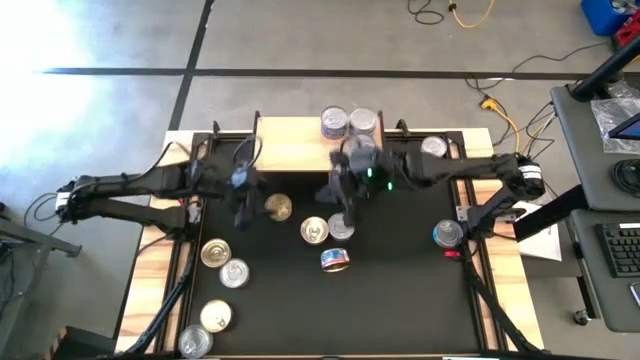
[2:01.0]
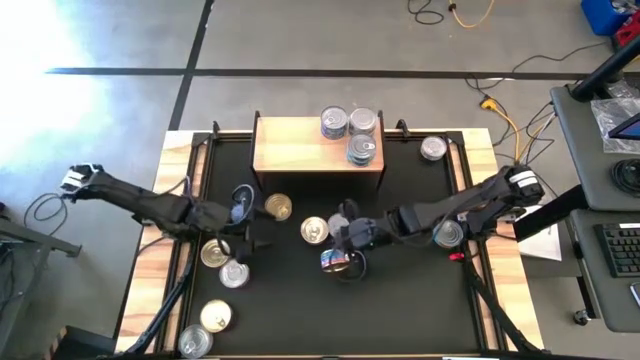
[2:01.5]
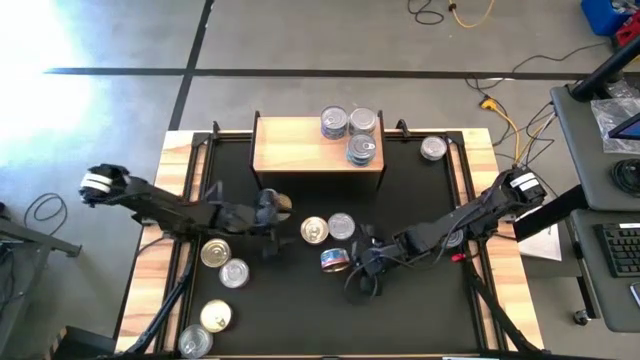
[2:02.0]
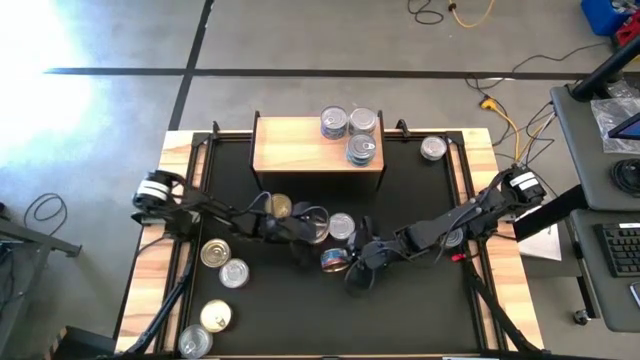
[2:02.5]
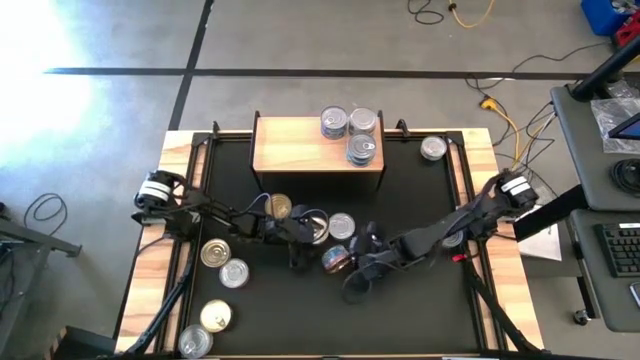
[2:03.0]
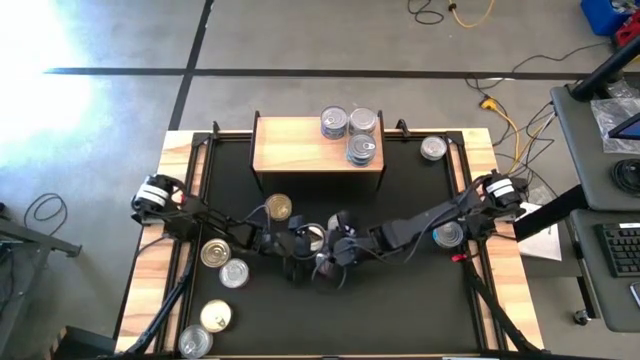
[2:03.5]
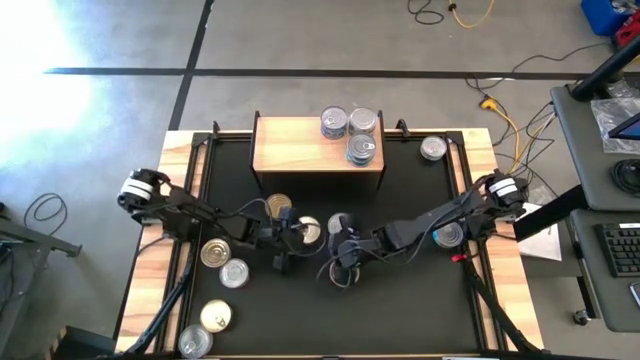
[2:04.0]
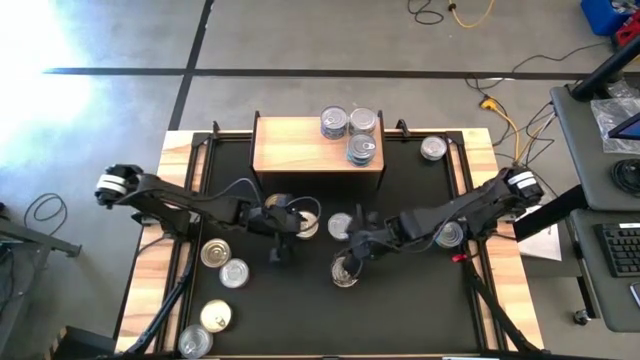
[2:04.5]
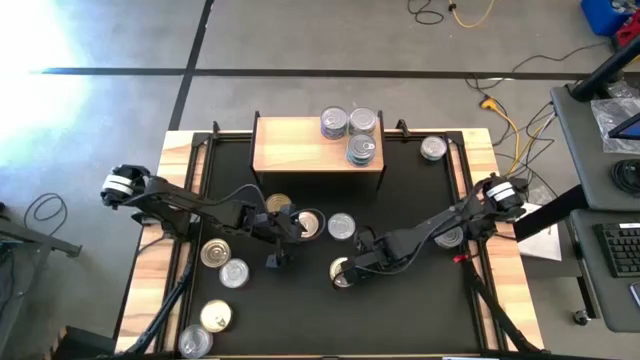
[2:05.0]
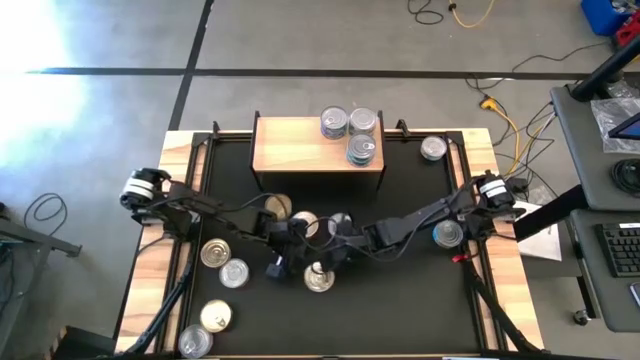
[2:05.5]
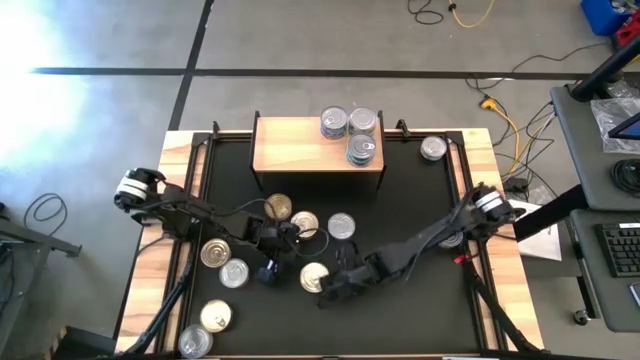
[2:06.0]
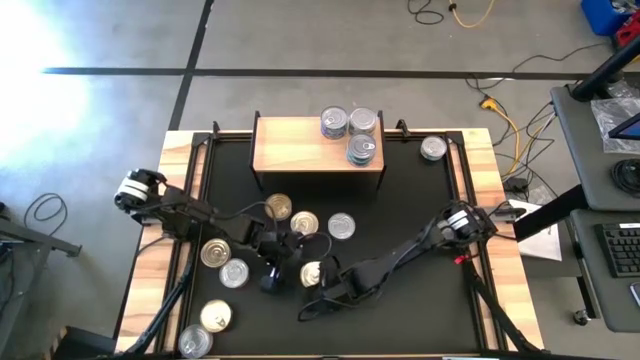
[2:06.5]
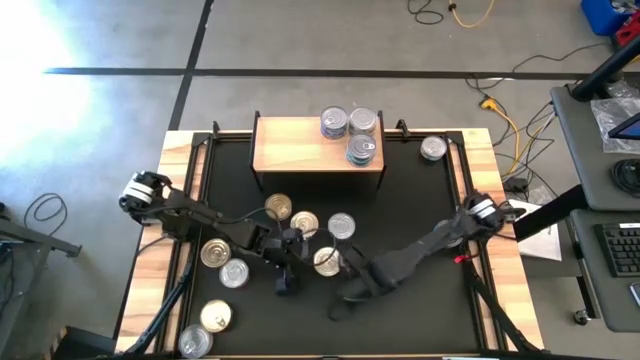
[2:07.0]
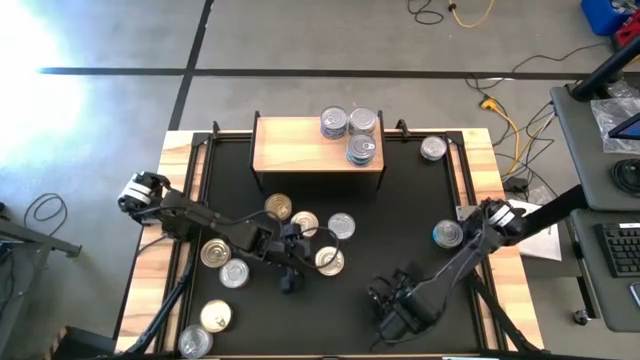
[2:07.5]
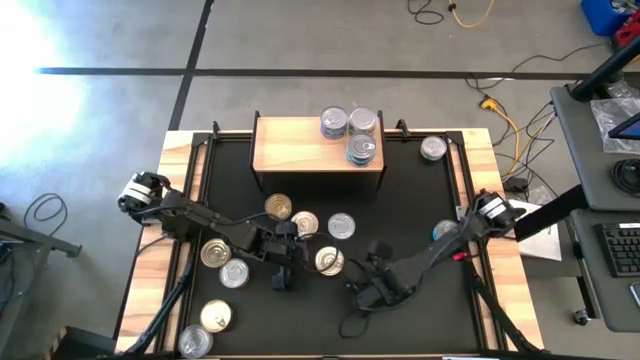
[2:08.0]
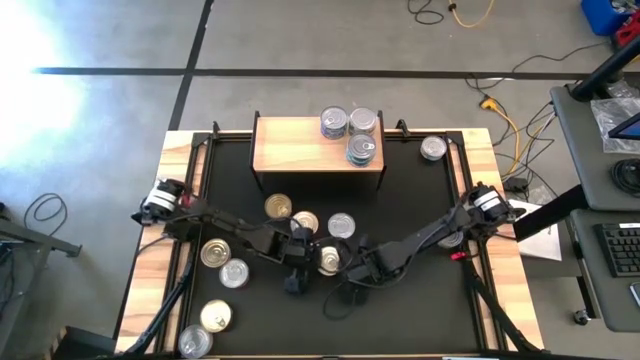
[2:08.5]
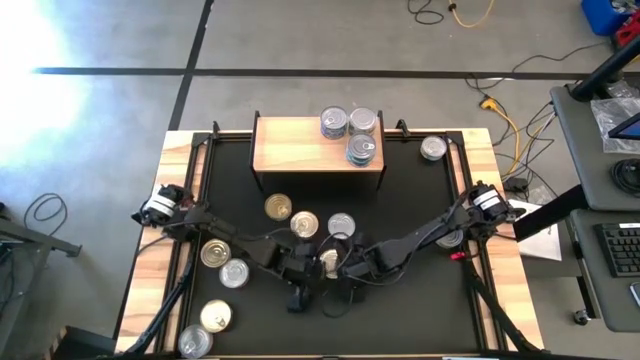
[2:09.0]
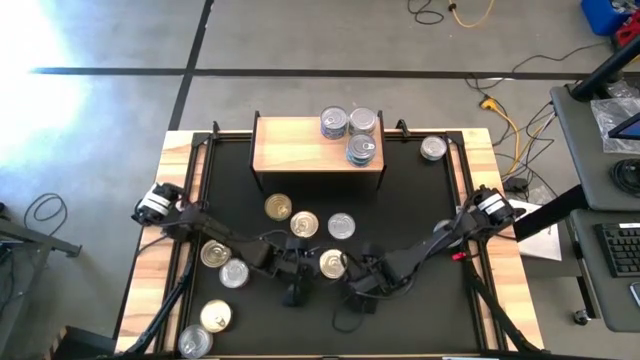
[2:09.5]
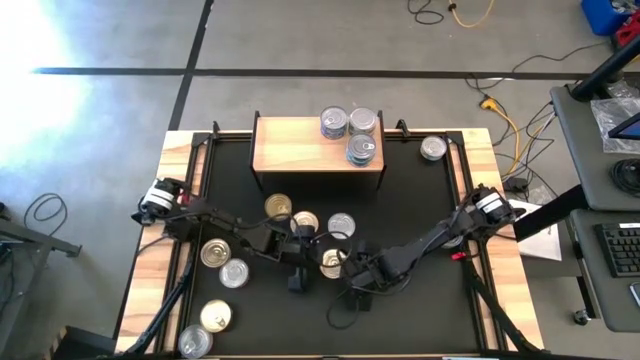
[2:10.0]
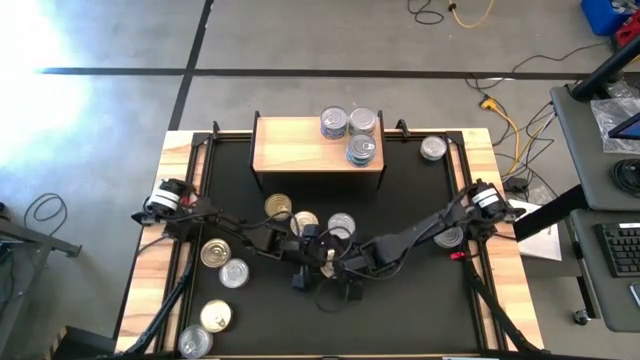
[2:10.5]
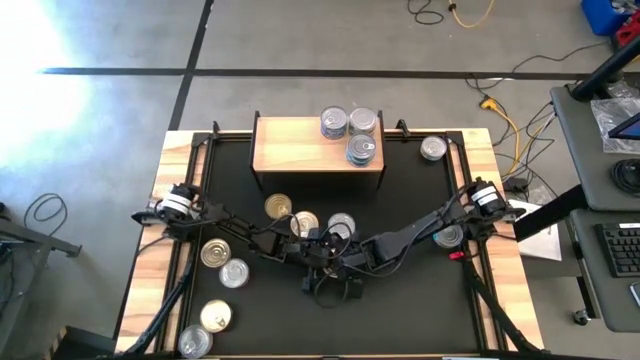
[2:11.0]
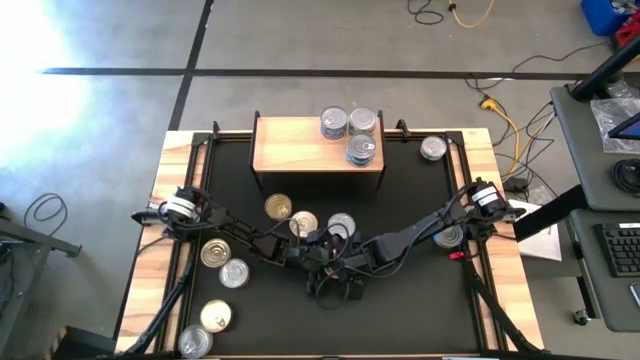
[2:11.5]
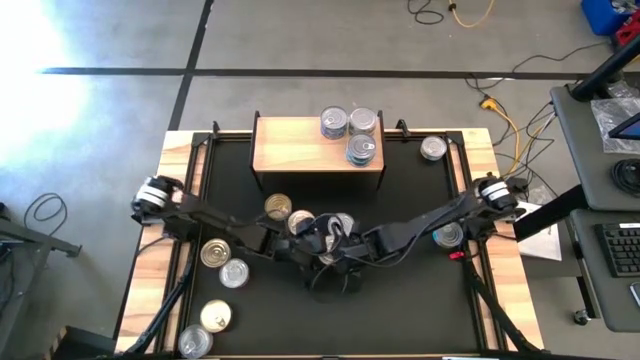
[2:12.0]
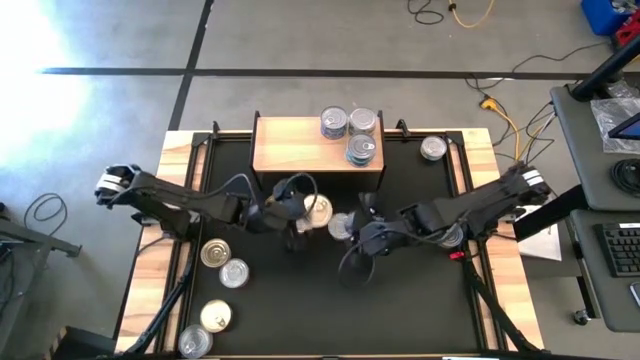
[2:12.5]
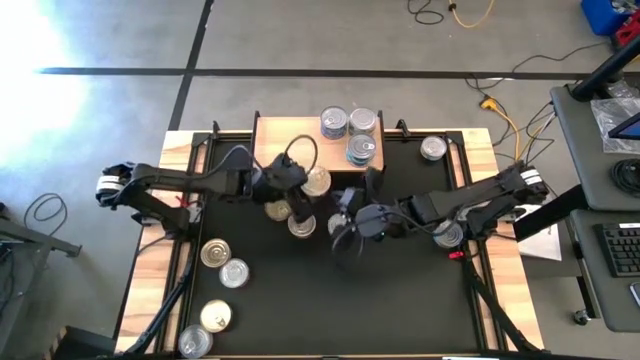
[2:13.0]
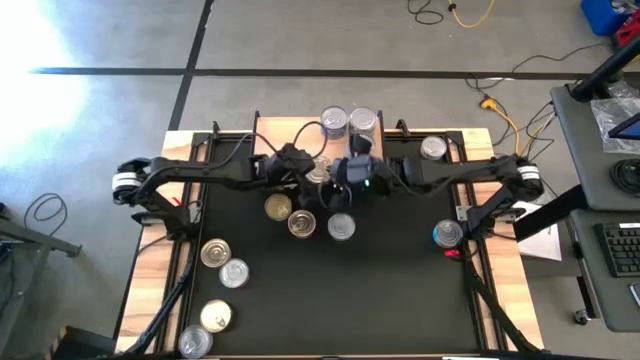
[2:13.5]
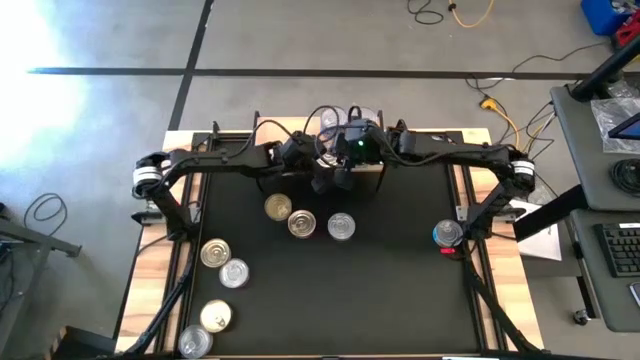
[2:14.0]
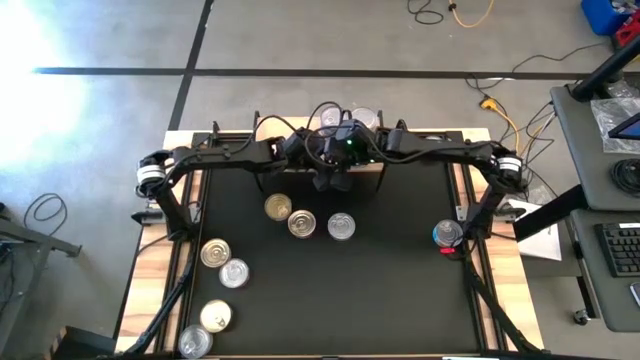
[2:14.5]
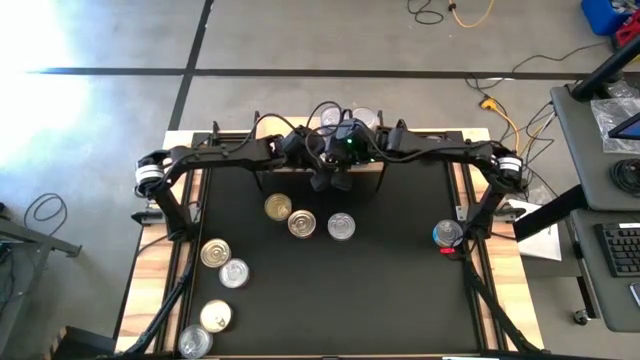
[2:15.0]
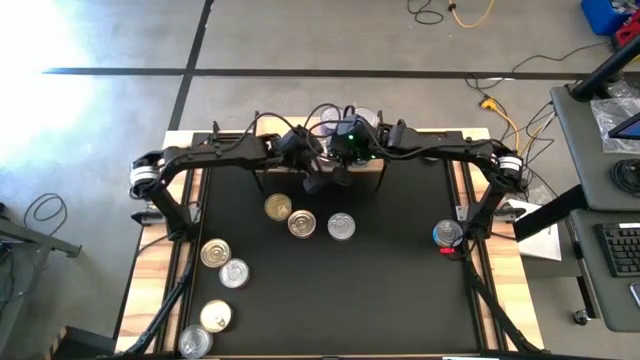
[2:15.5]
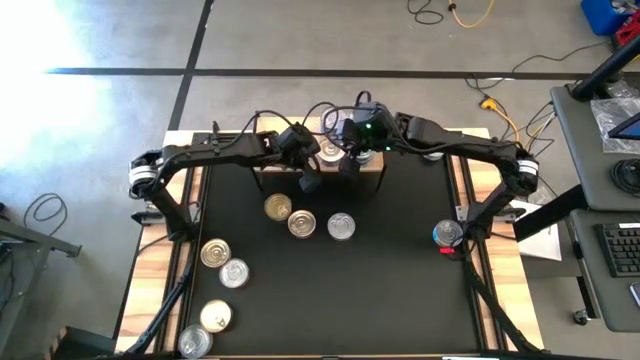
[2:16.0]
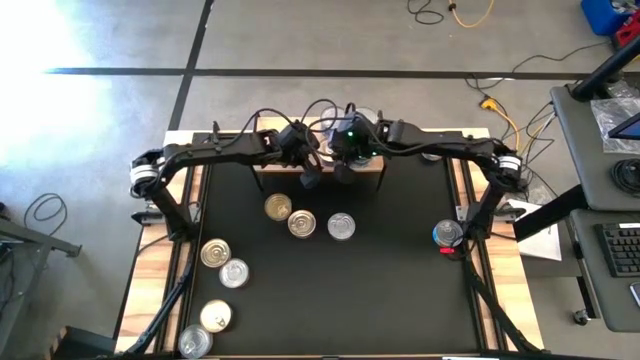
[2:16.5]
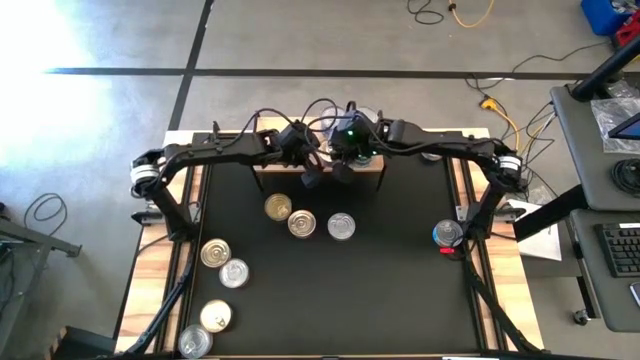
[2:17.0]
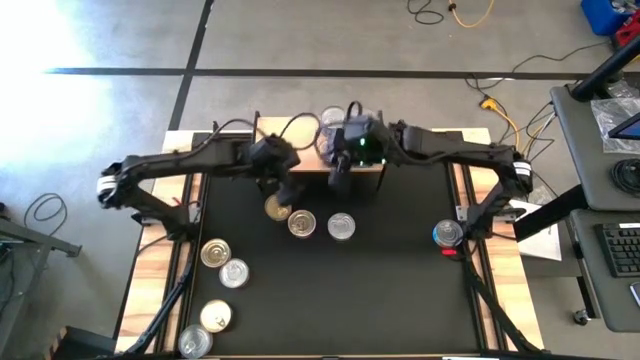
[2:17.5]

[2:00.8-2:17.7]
Task: Stack canned seafood by type on shelf
Put the center pink tuna can on the shelf

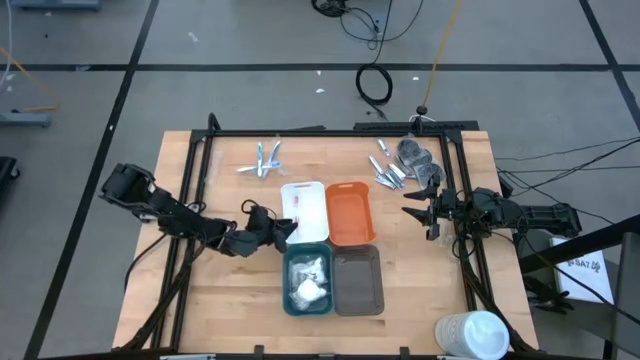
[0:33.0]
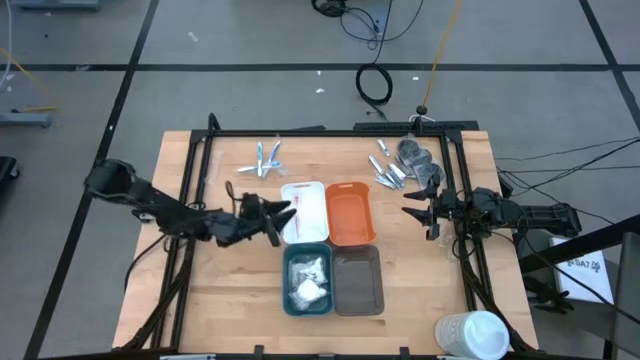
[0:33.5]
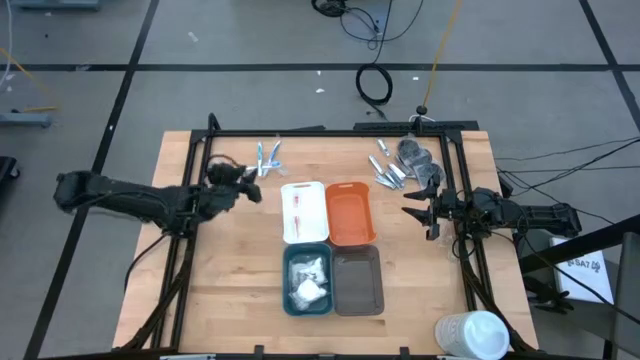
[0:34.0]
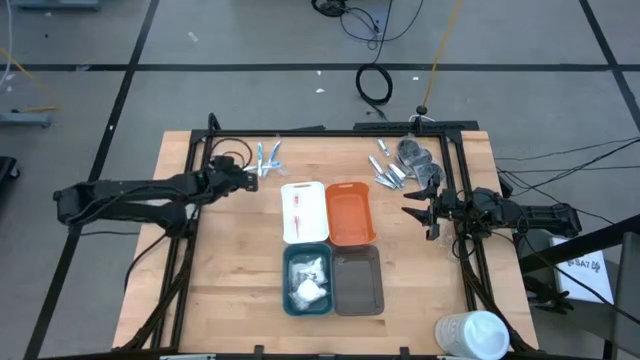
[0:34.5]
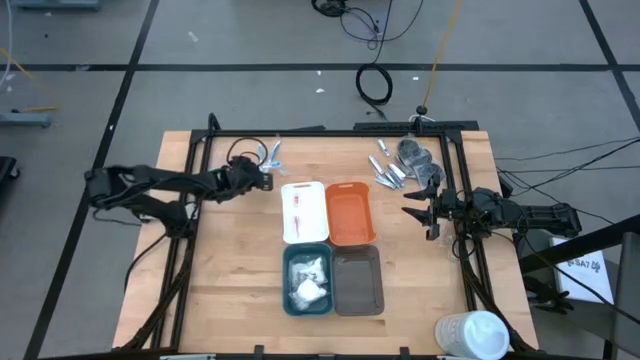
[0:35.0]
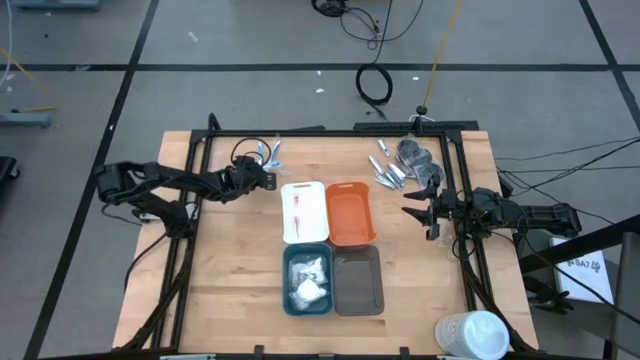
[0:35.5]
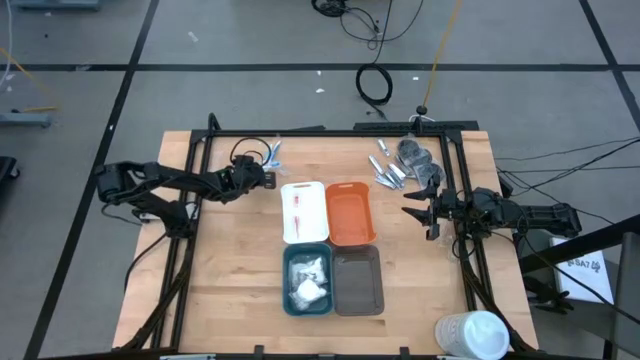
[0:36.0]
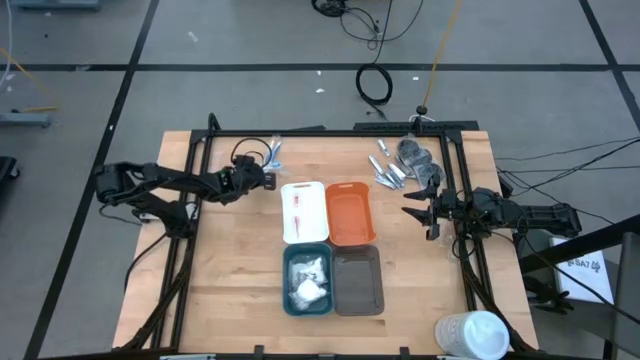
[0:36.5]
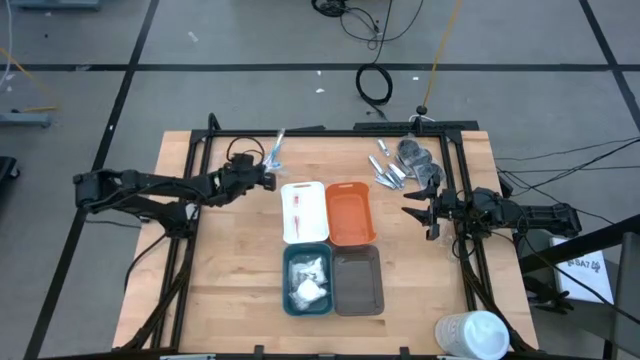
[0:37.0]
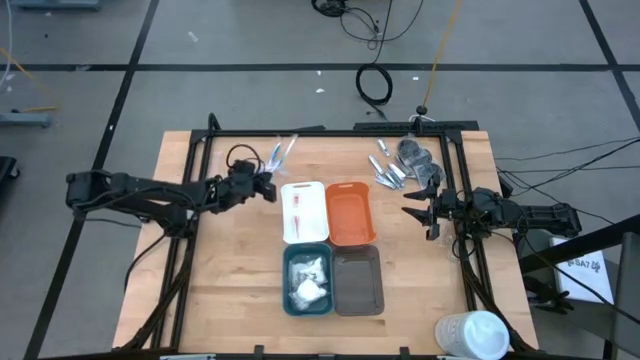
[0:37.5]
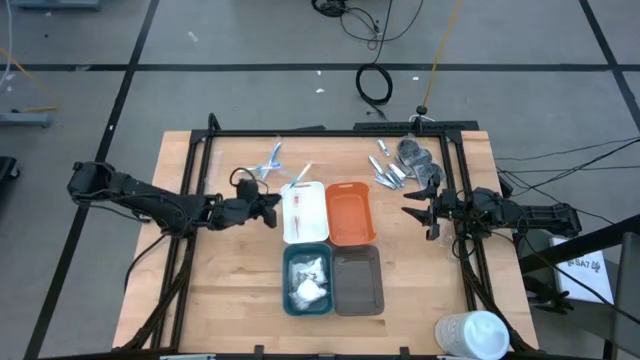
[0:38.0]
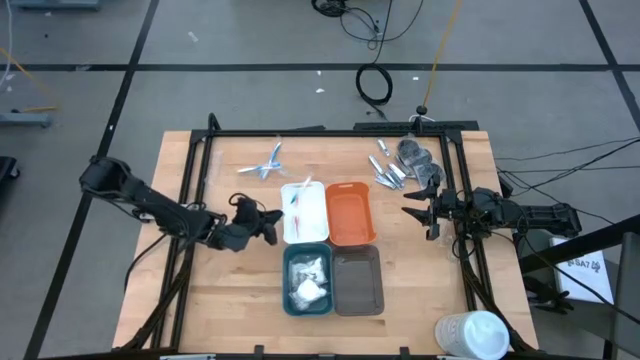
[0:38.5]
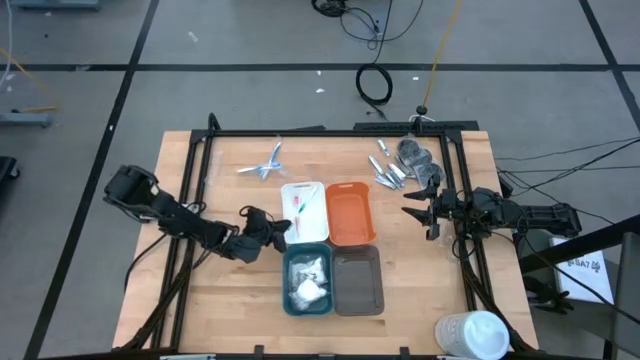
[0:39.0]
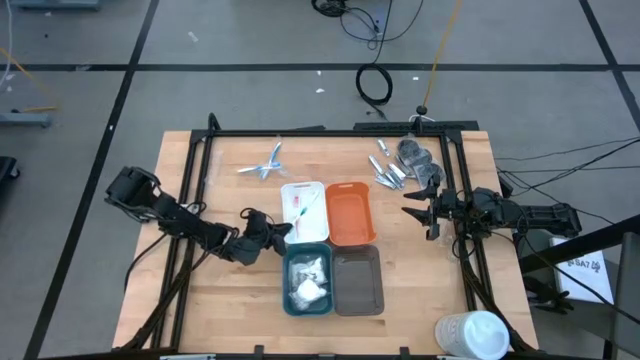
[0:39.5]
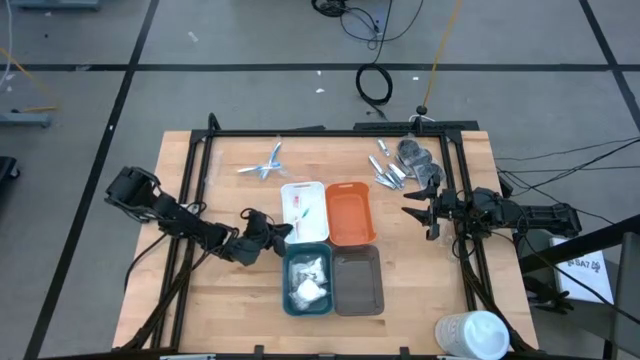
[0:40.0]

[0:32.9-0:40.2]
Task: Pick & Place Travel size toiletries
Put the green toothbrush into the white bin
